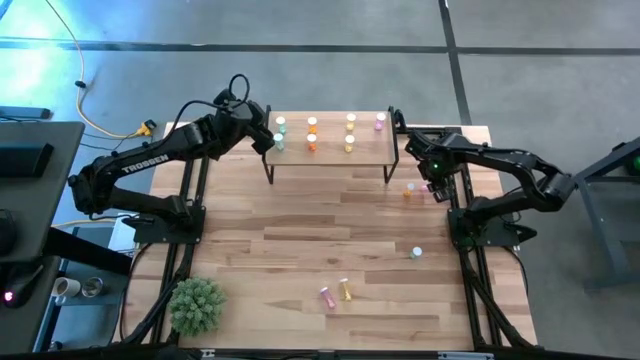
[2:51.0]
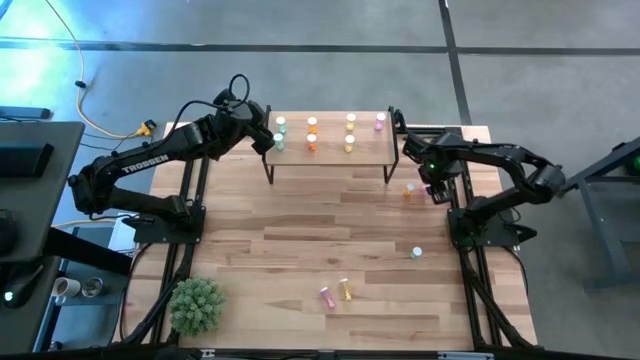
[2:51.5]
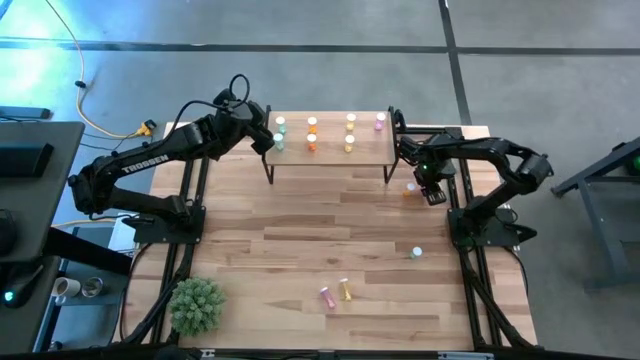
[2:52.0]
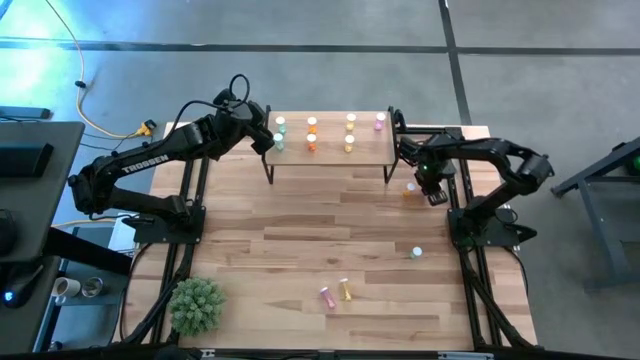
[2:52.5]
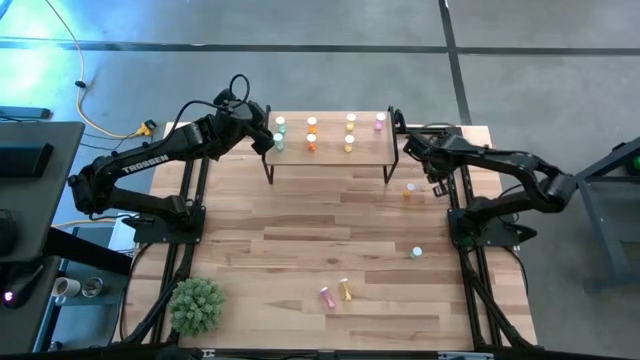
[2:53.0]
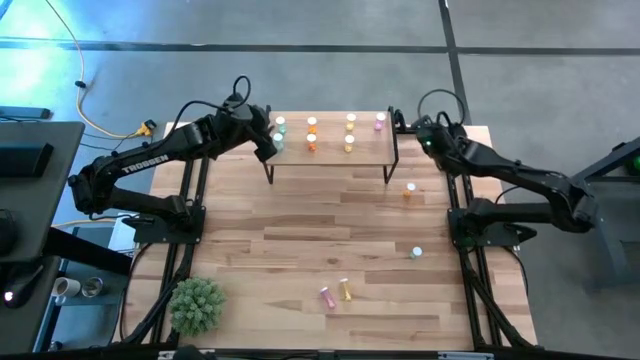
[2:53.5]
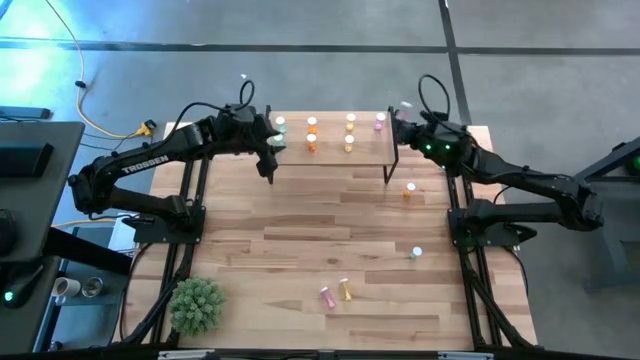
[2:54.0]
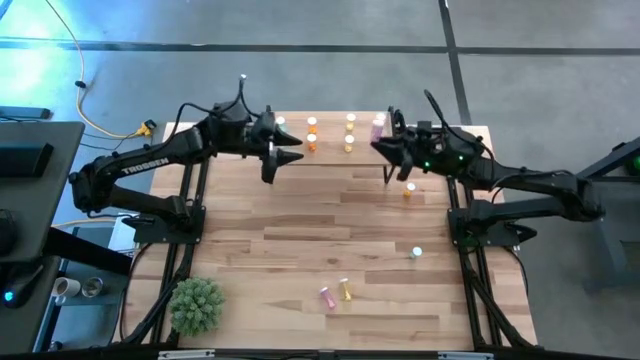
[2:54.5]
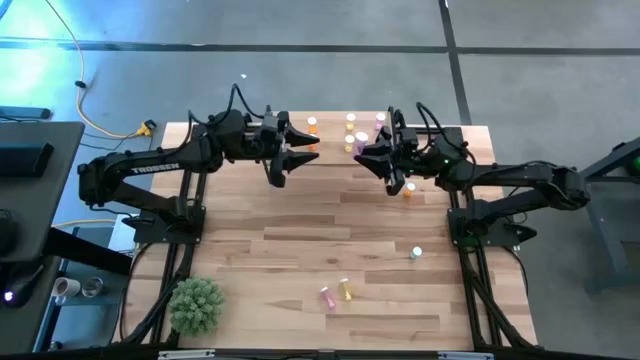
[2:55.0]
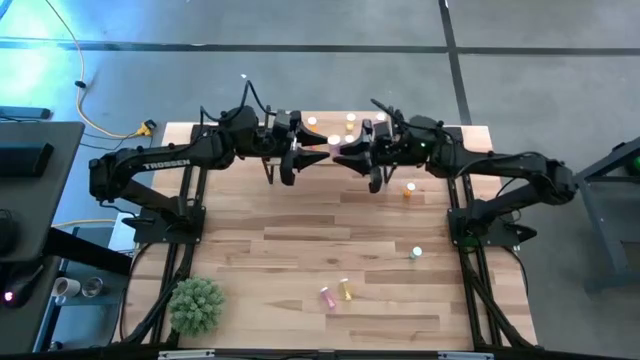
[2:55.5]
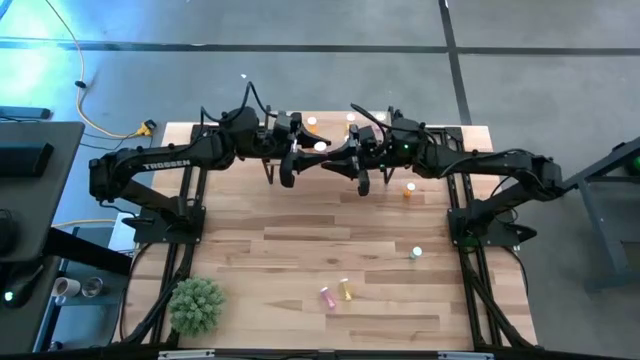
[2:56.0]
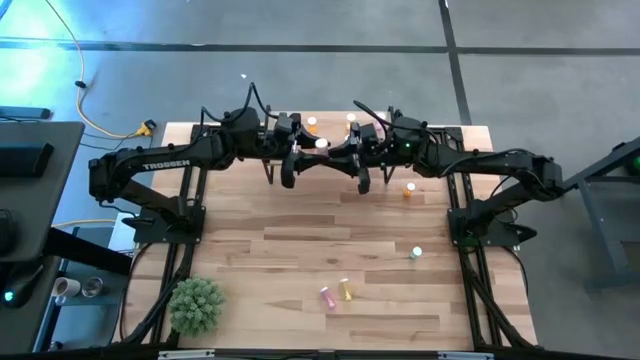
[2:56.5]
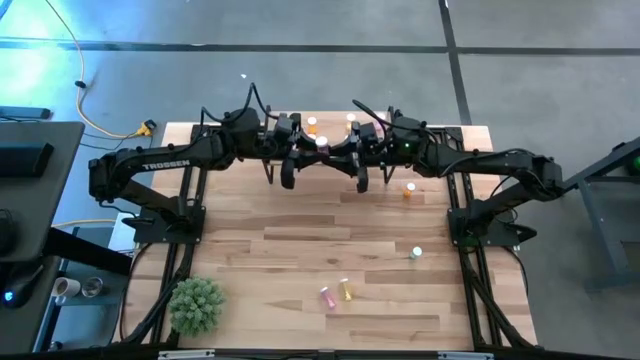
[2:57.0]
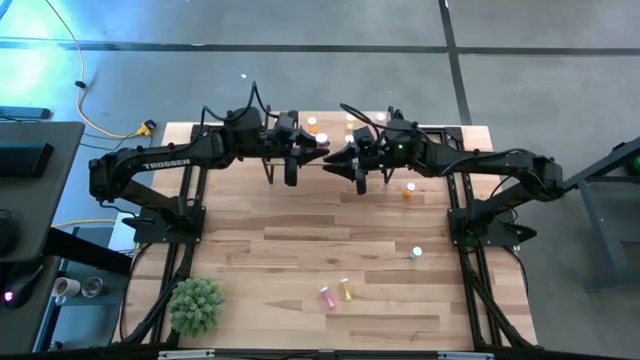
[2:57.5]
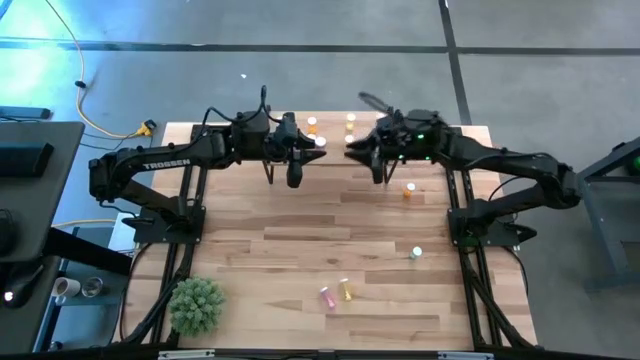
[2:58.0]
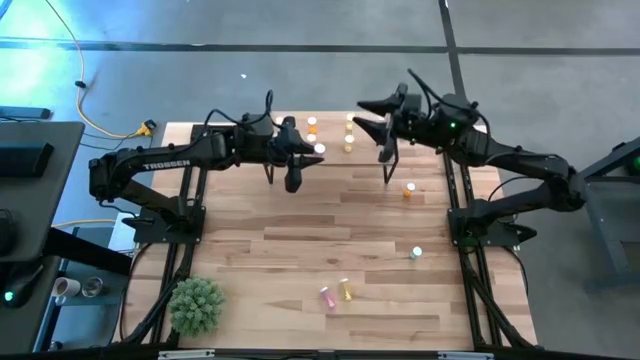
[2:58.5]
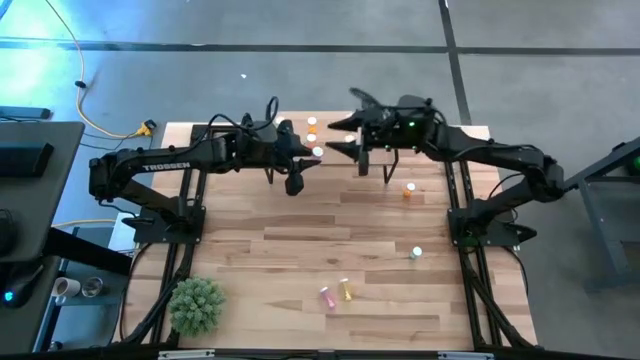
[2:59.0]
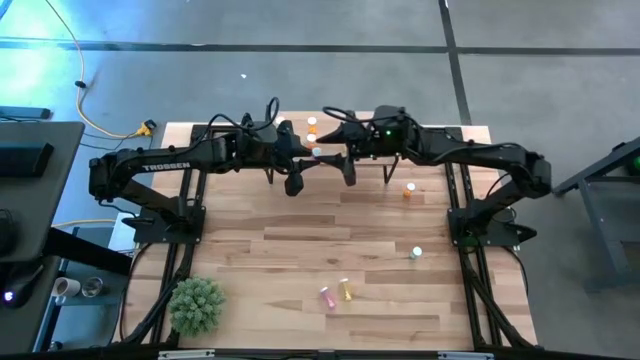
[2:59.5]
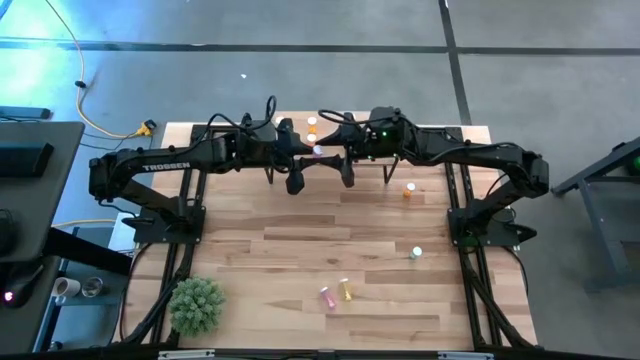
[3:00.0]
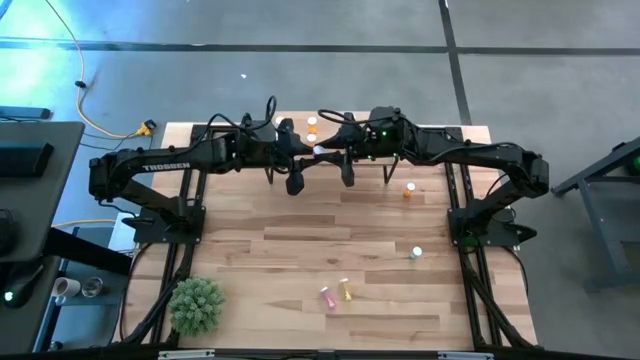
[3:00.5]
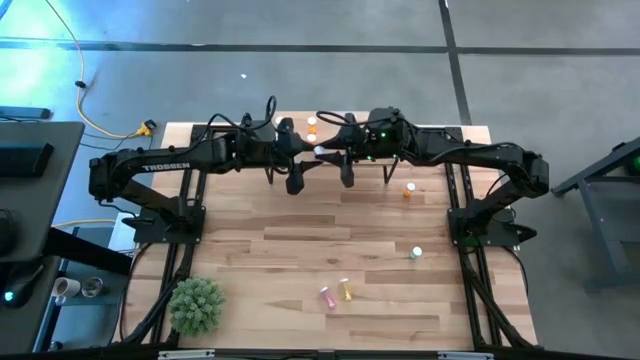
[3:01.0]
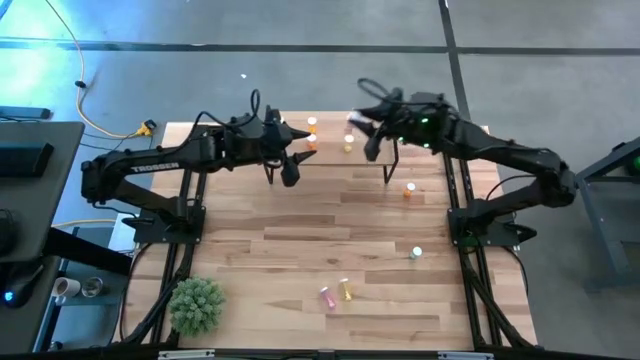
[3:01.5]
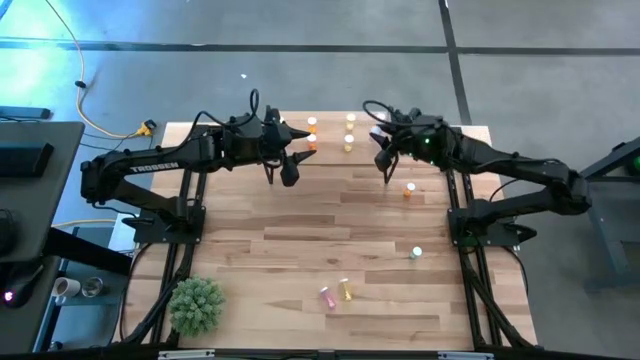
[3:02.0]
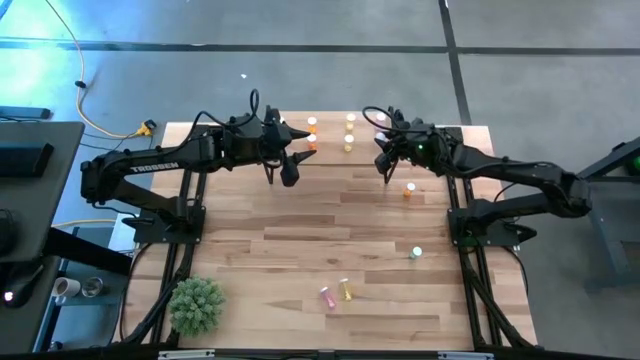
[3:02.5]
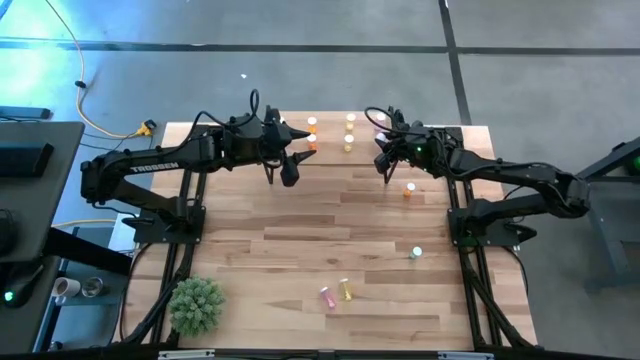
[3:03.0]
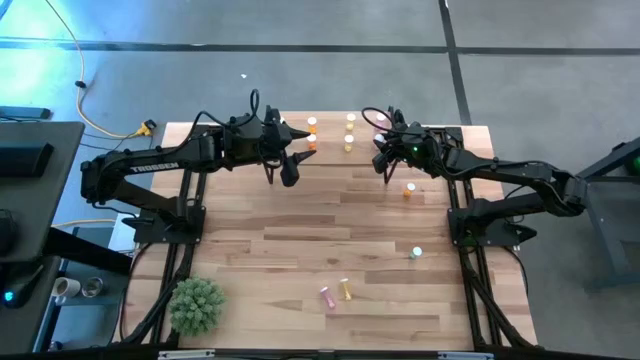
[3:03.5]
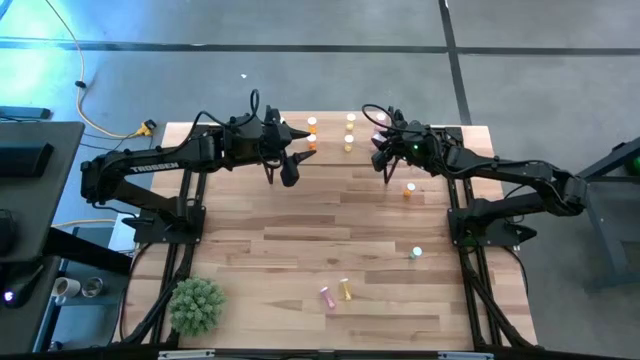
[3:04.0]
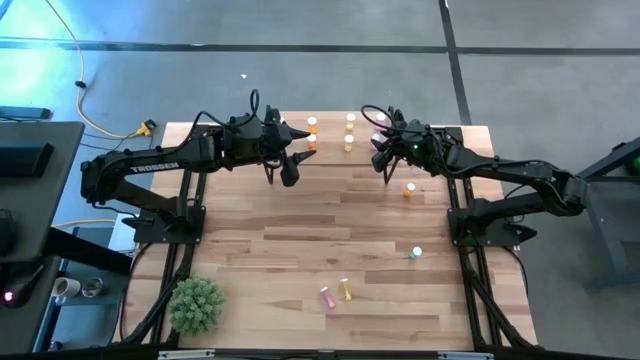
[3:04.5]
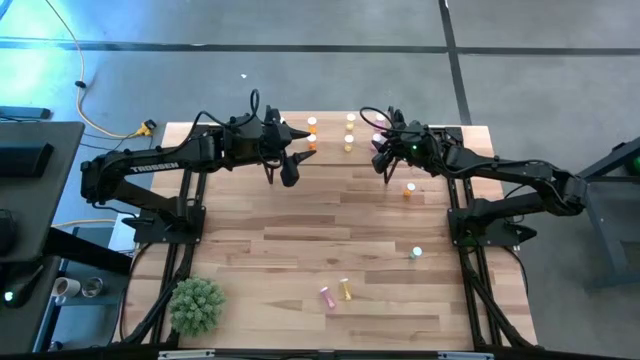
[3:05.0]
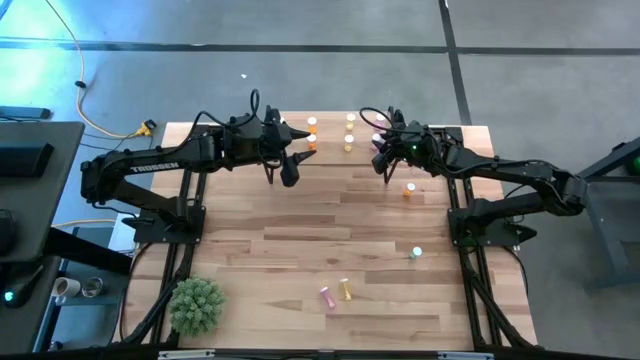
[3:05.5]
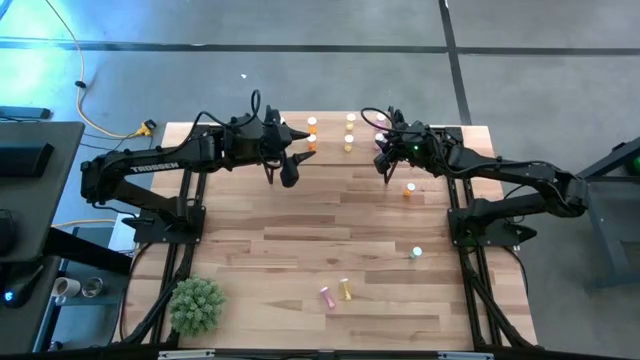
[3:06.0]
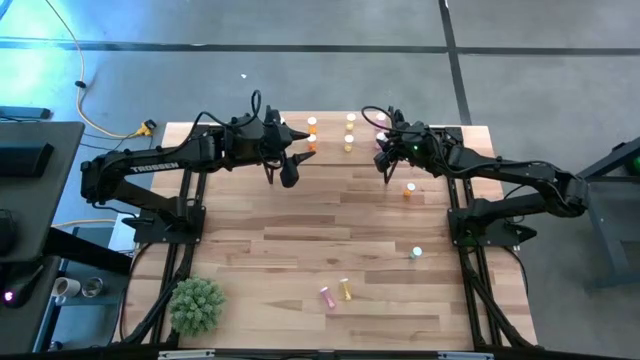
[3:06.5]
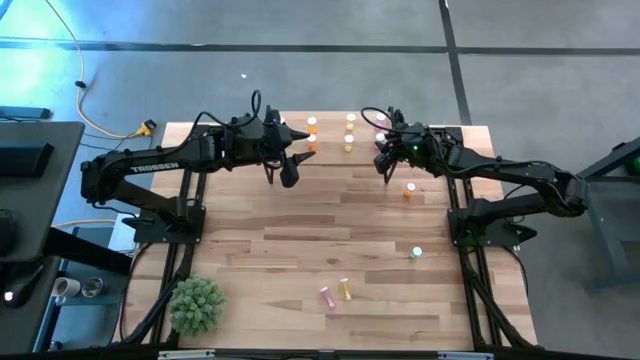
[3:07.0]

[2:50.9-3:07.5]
Task: Pick and place medicine bottles onto shelf by color
Put the top violet pill bottle on the shelf aligned with the other violet pill bottle
